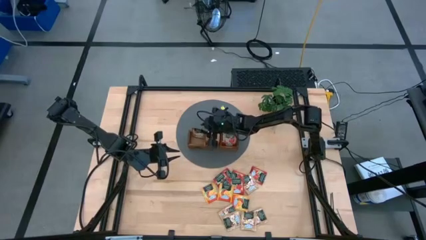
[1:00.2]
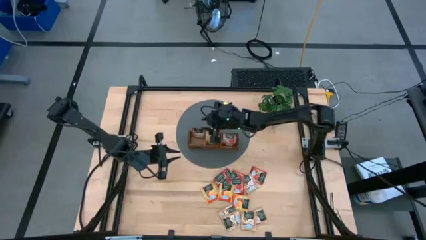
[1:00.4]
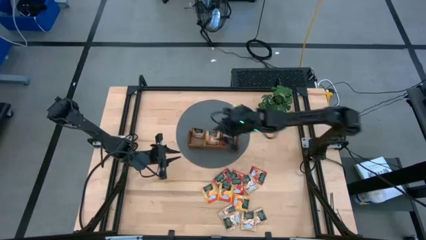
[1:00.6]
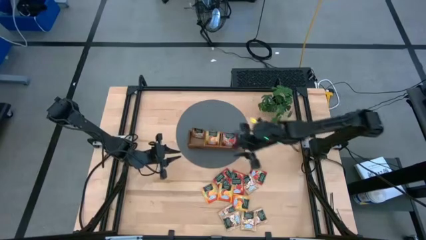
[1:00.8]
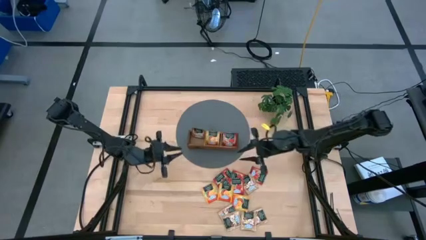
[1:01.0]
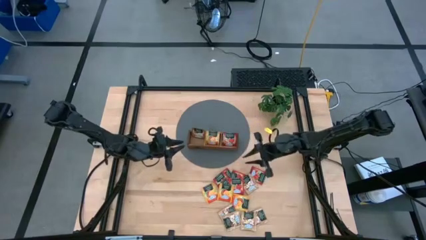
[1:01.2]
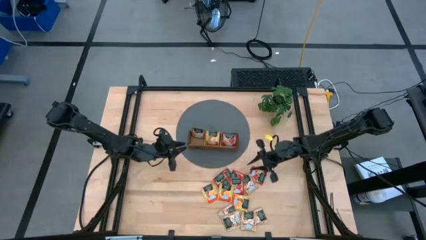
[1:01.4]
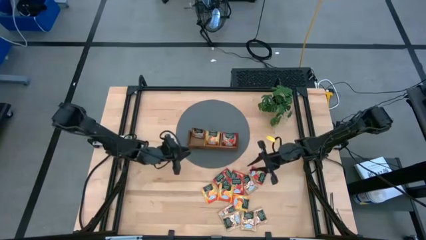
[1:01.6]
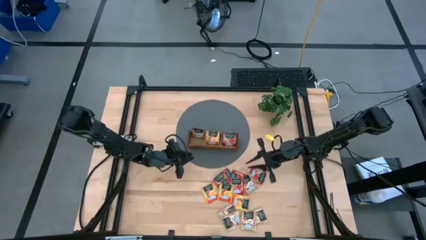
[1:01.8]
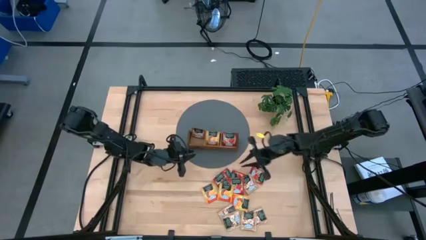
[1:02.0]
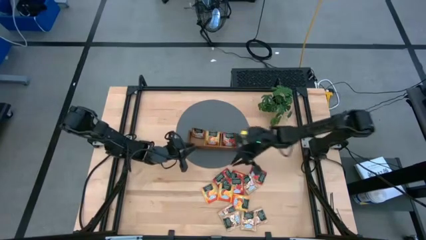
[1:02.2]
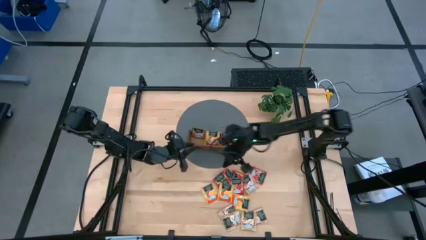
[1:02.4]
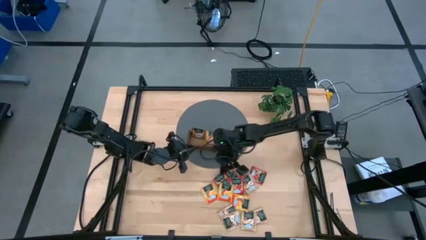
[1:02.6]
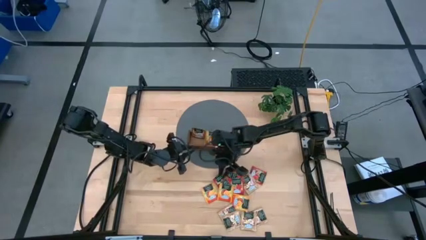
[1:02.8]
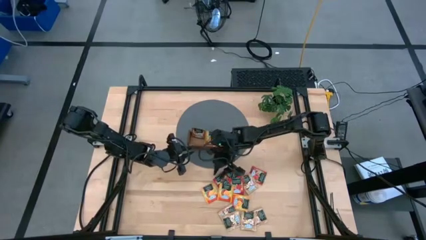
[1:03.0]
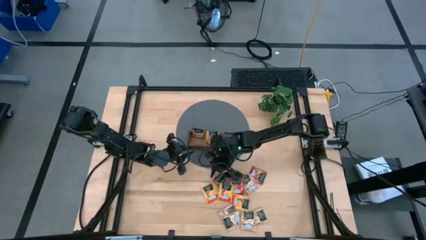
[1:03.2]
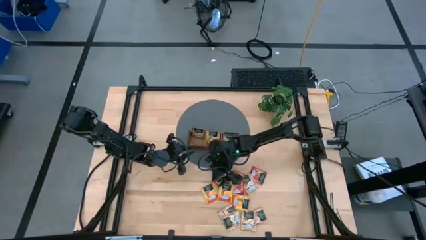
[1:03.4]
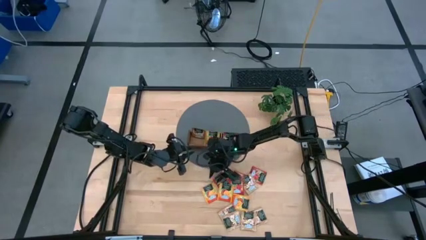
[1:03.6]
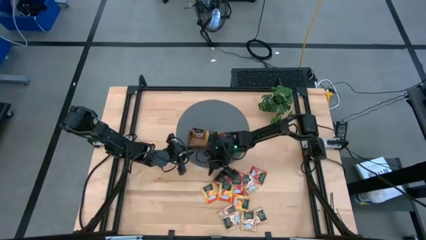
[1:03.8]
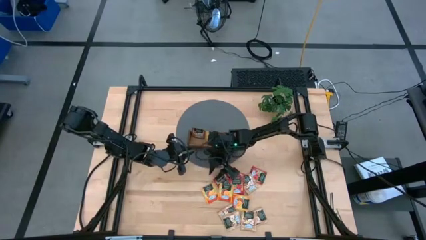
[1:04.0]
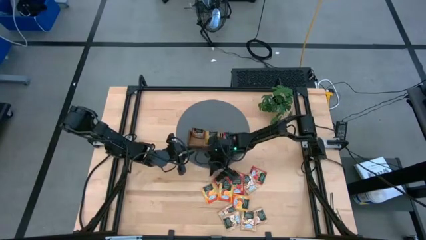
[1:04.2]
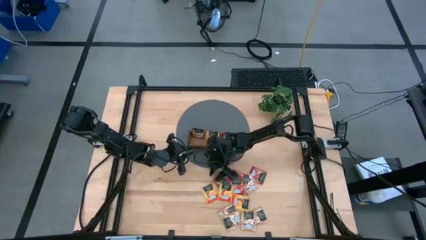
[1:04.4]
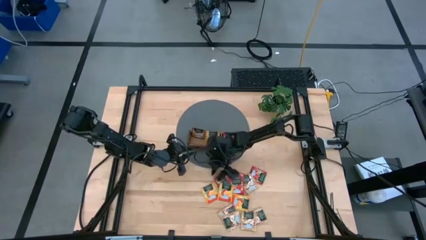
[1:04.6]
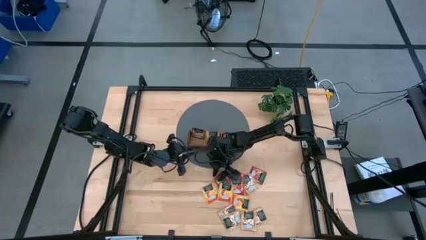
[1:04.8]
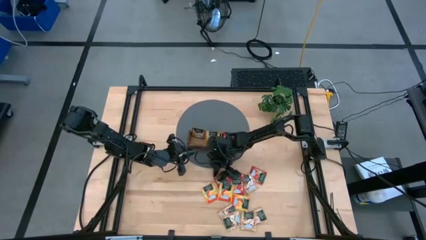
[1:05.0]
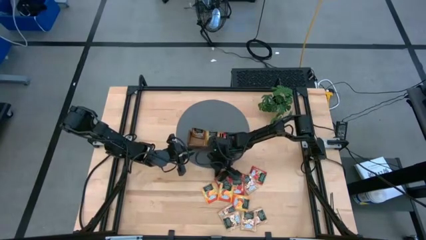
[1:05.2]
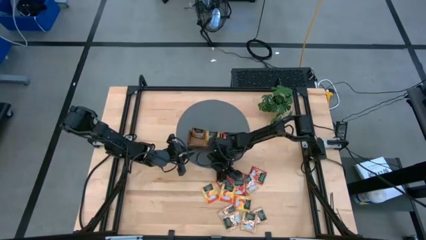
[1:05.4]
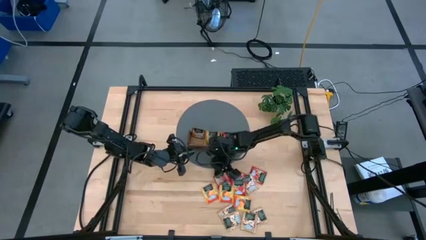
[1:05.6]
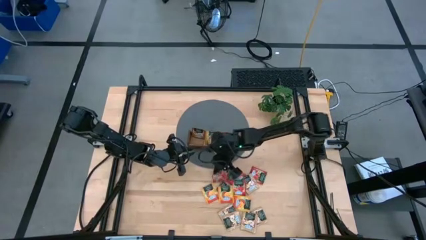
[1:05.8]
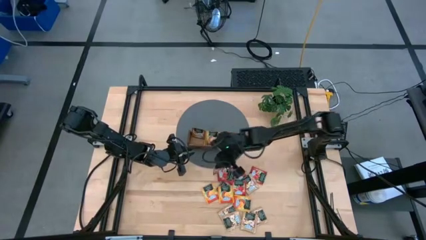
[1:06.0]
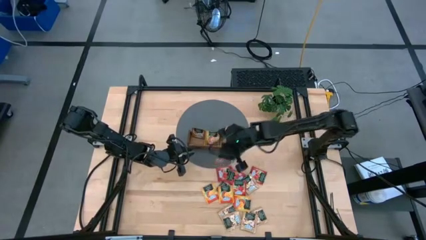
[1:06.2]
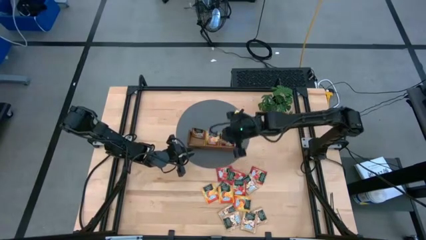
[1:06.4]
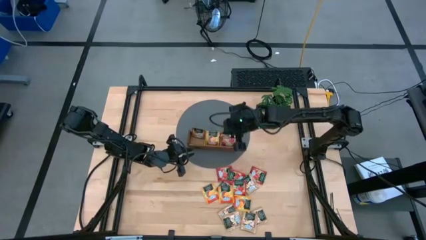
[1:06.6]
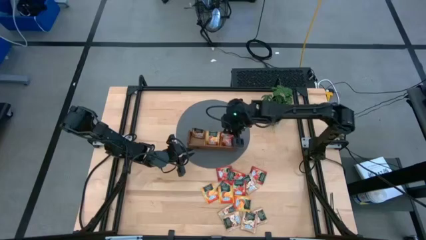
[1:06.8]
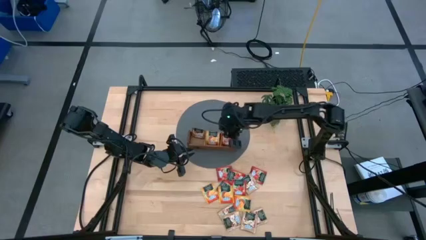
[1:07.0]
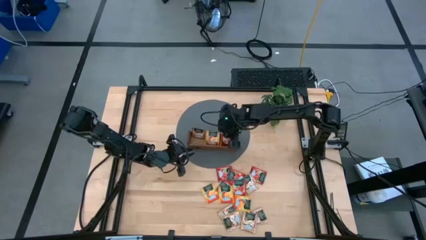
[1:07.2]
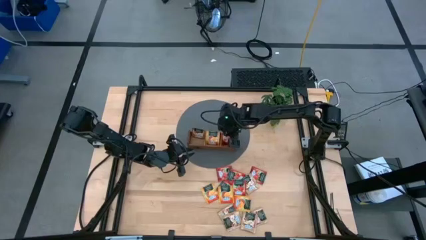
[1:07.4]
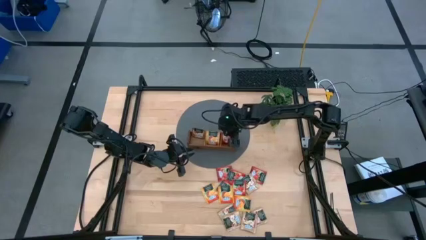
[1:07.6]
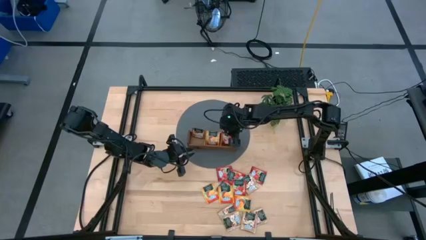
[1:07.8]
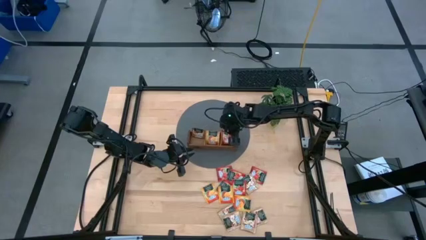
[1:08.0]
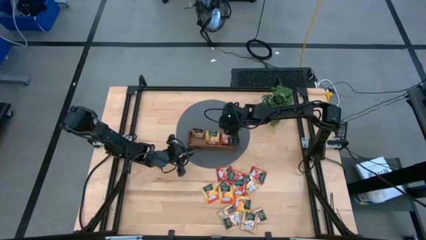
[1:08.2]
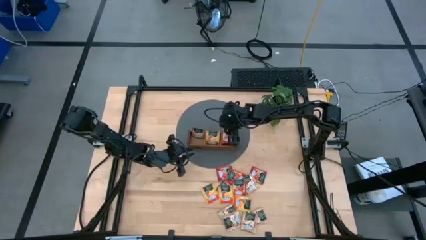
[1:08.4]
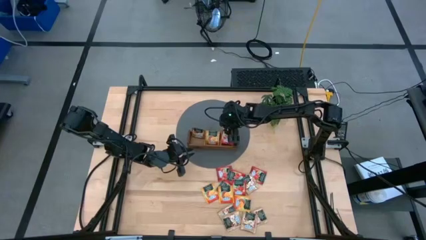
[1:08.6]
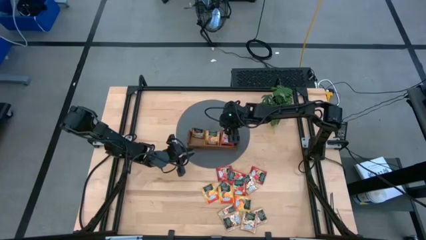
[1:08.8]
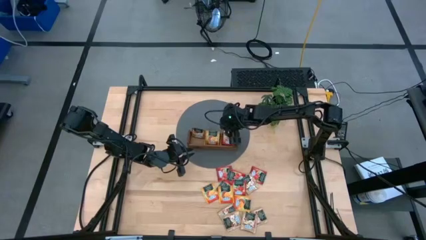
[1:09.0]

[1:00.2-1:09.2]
Task: Pick & Place Tea
Put the red tea bag into the right section of the wooden organizer

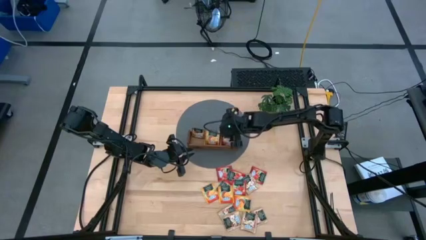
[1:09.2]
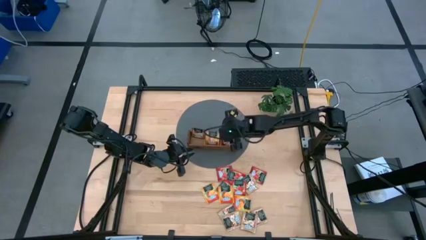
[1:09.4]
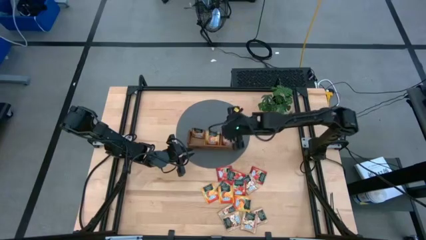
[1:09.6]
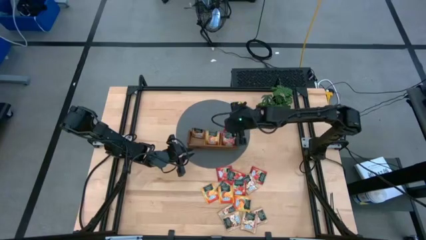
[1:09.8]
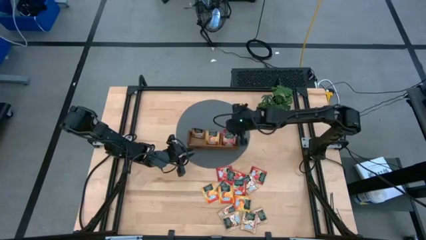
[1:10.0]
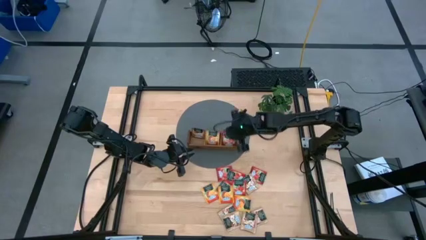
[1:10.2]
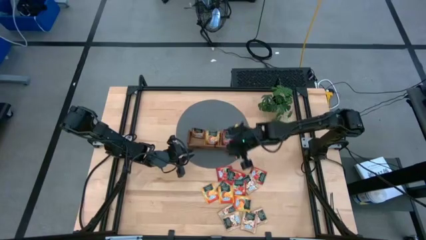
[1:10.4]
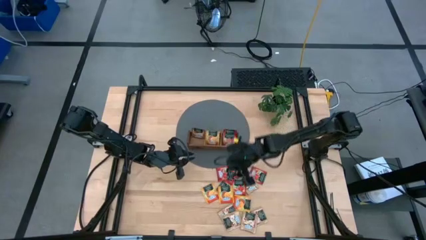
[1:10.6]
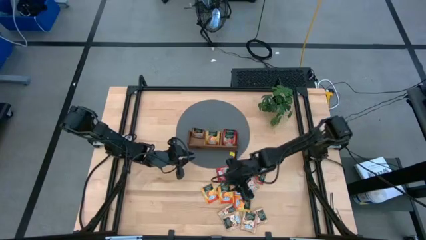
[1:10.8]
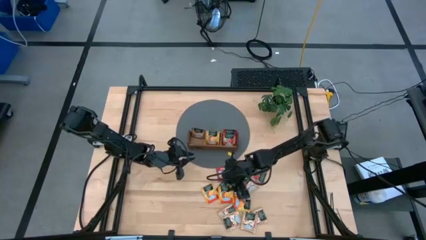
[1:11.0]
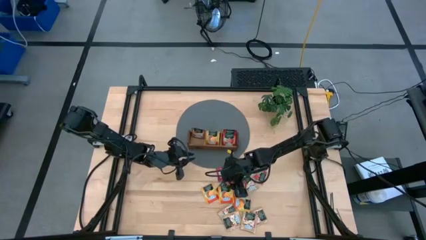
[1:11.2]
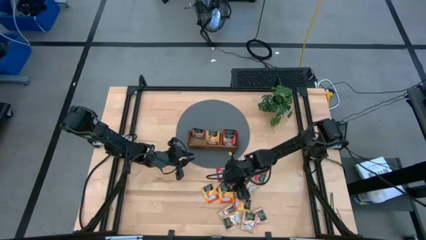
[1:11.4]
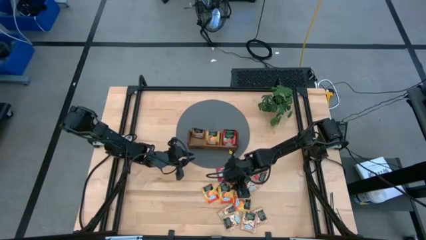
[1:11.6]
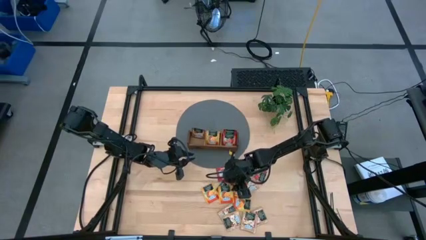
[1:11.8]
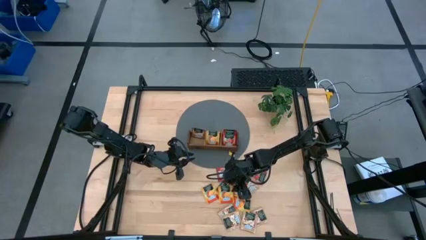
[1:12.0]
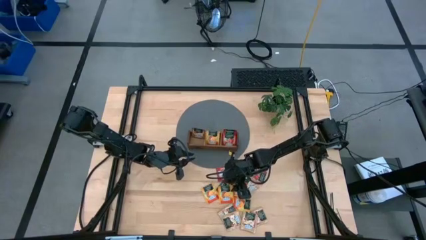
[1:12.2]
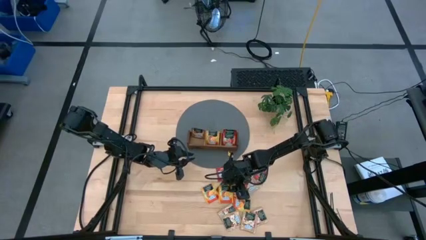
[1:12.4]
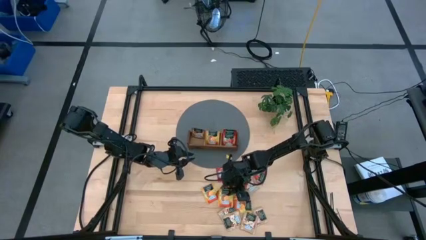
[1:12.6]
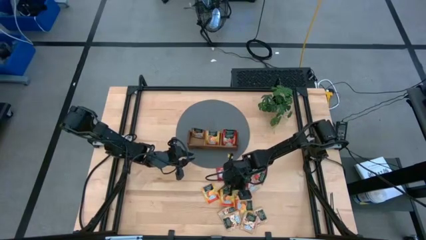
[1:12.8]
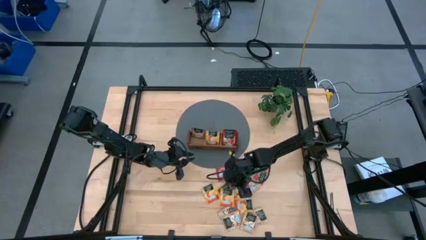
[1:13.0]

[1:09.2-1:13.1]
Put the yellow tea bag into the middle section of the wooden organizer
